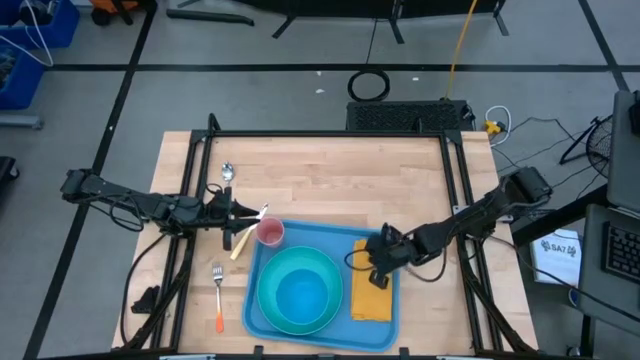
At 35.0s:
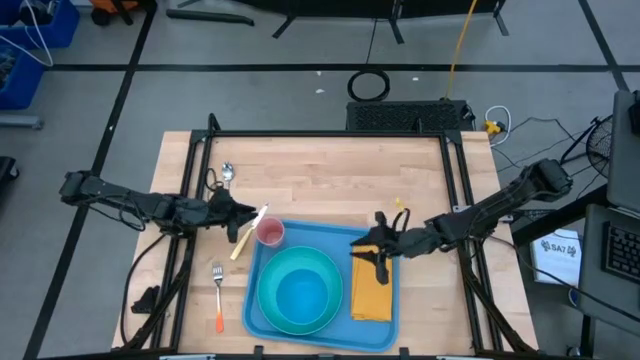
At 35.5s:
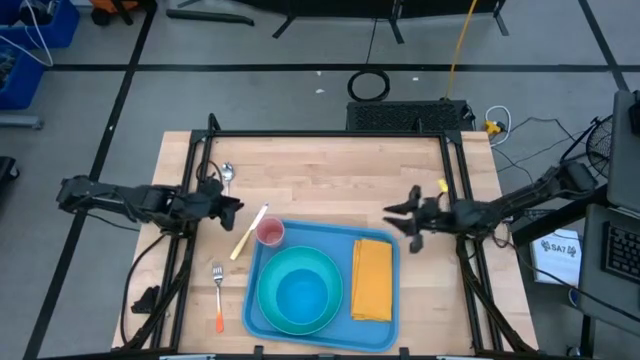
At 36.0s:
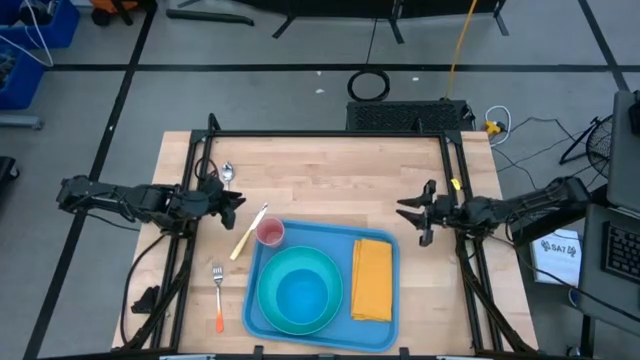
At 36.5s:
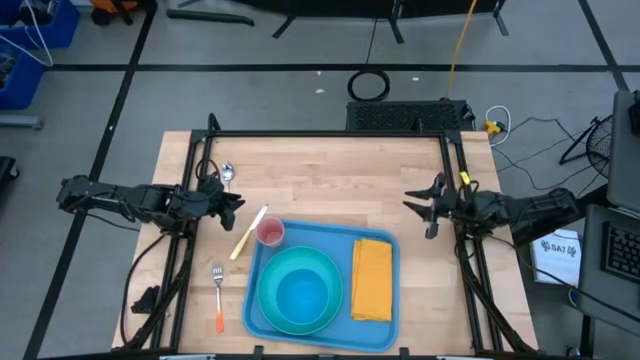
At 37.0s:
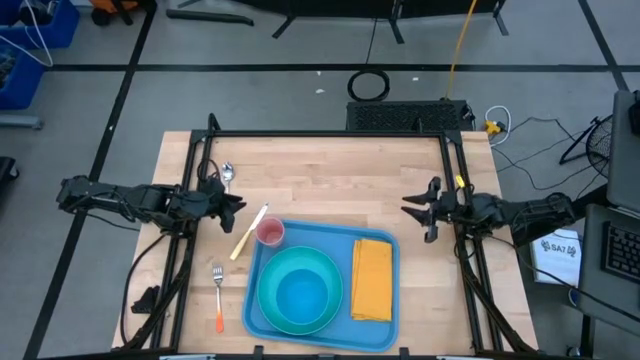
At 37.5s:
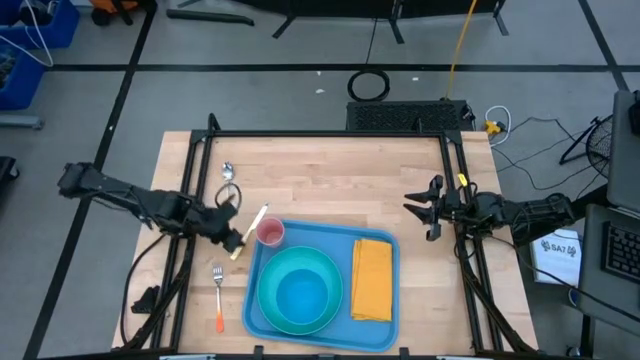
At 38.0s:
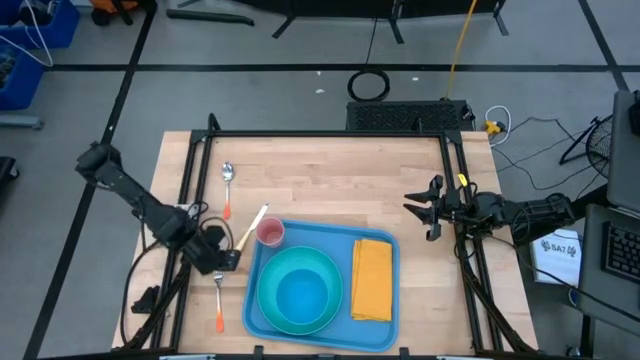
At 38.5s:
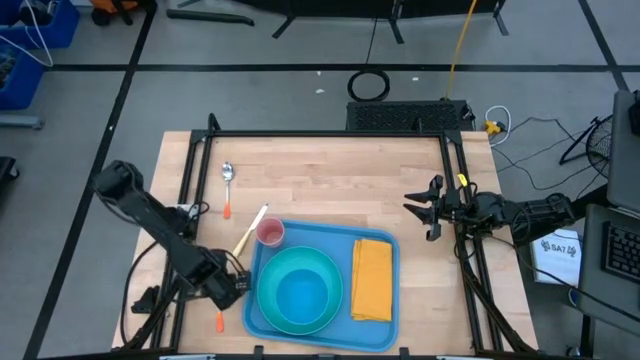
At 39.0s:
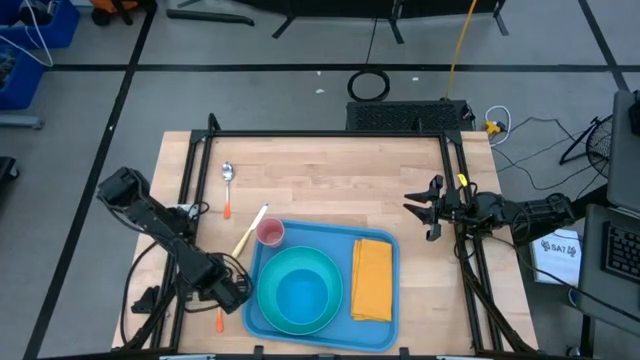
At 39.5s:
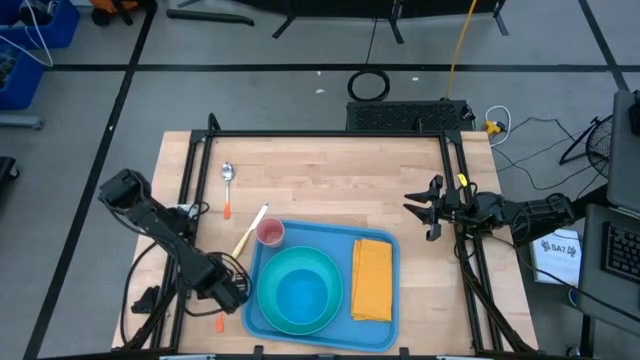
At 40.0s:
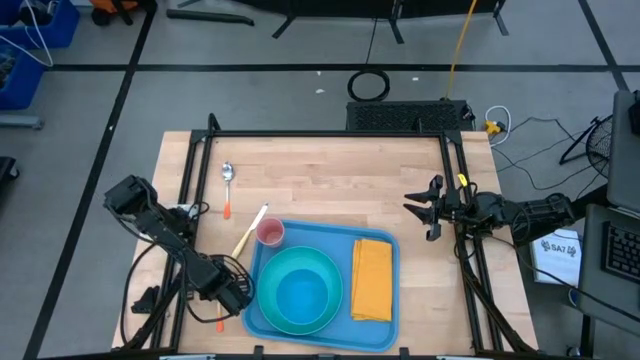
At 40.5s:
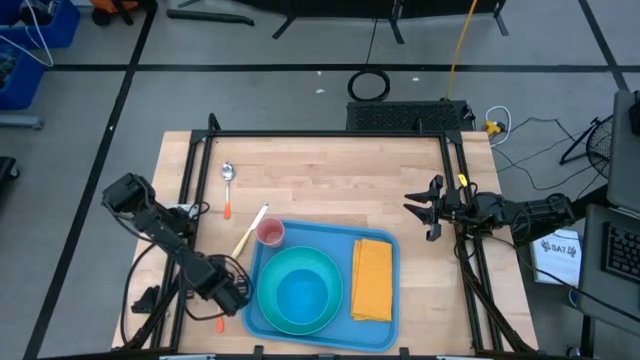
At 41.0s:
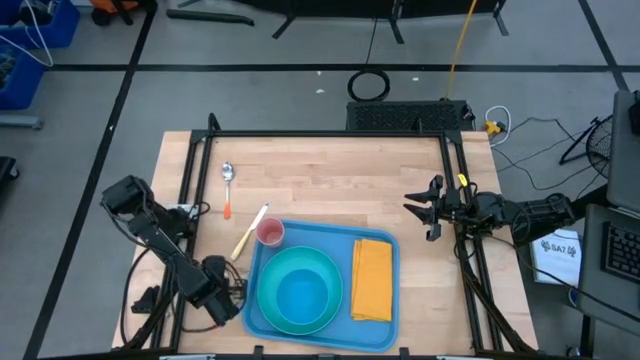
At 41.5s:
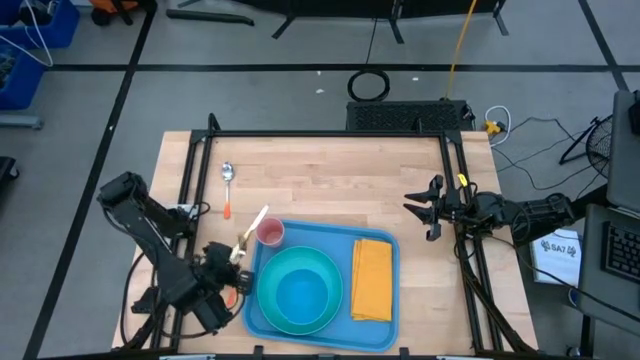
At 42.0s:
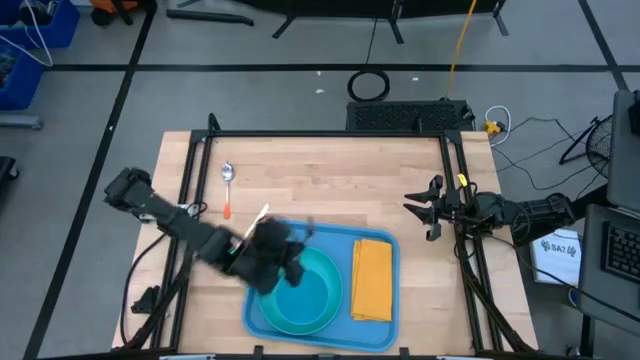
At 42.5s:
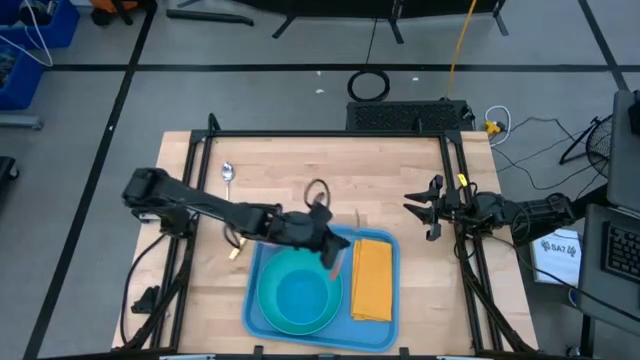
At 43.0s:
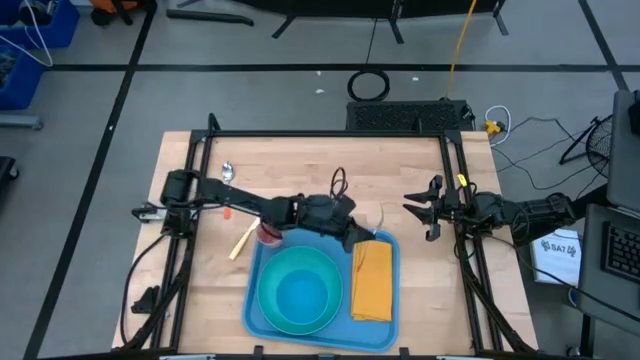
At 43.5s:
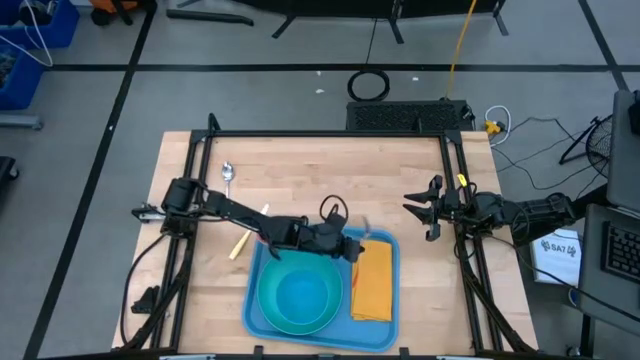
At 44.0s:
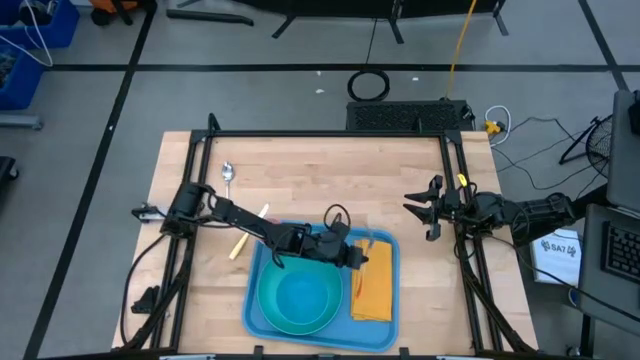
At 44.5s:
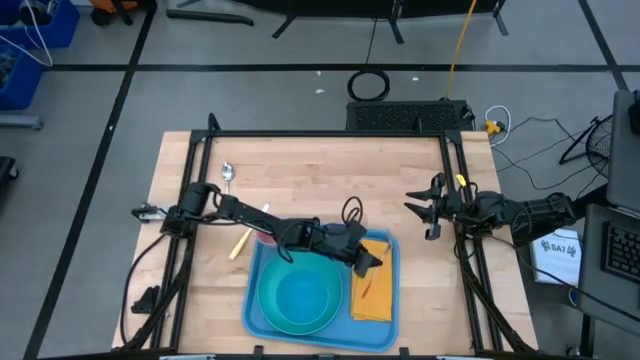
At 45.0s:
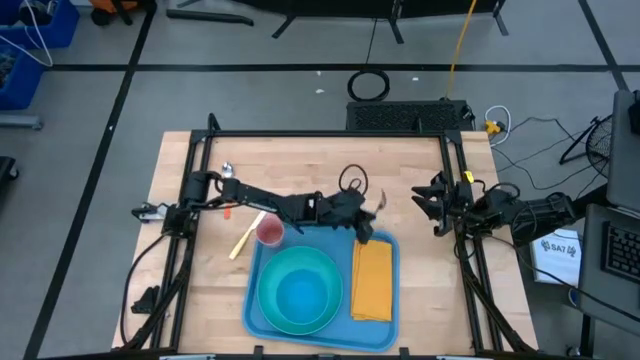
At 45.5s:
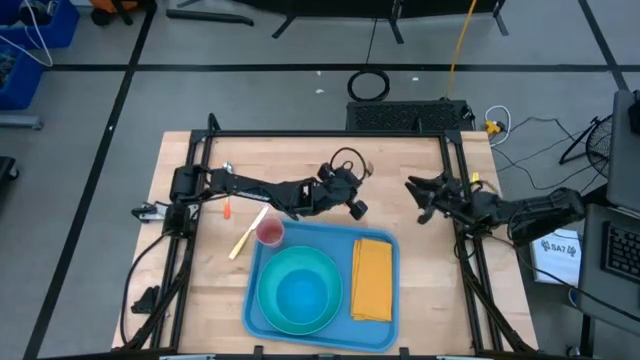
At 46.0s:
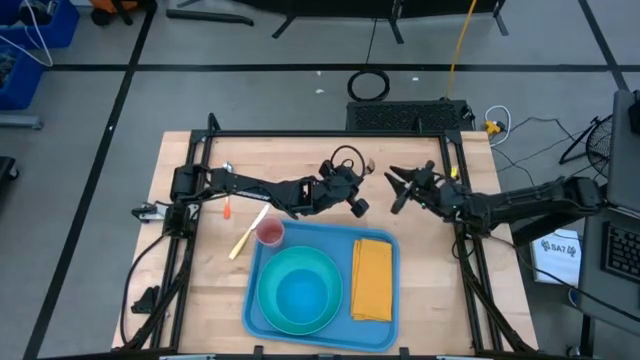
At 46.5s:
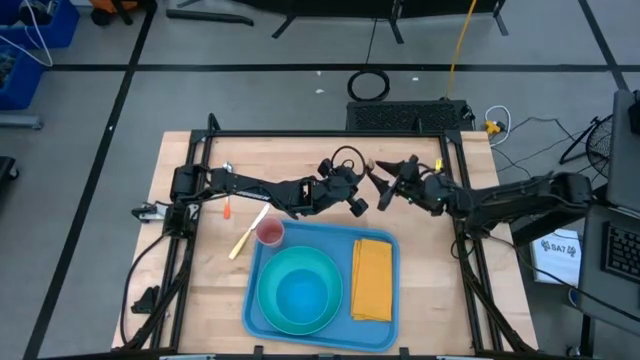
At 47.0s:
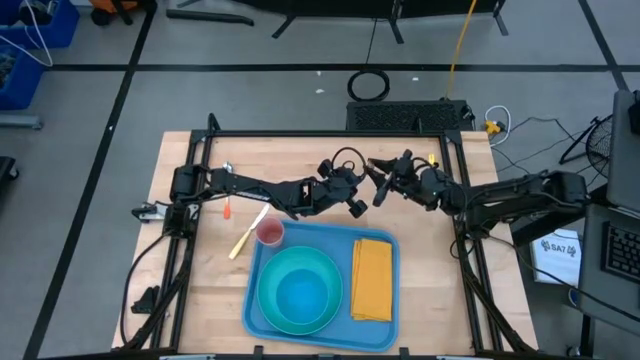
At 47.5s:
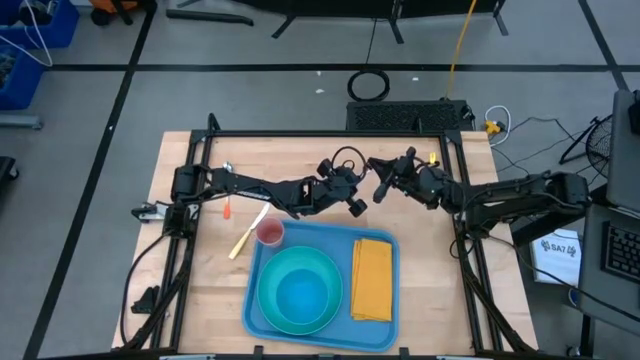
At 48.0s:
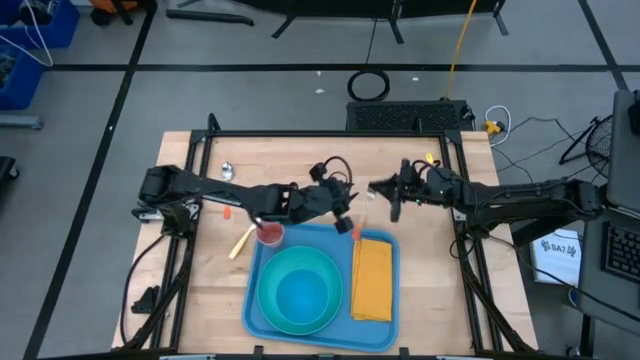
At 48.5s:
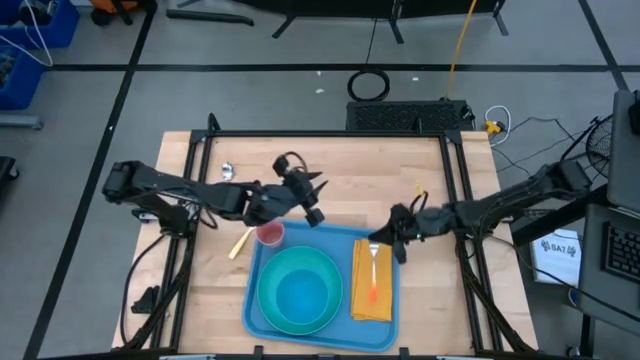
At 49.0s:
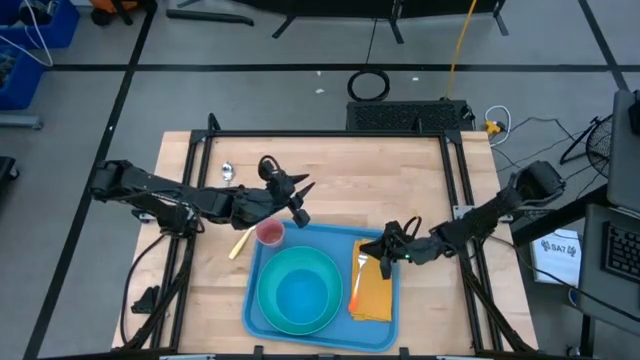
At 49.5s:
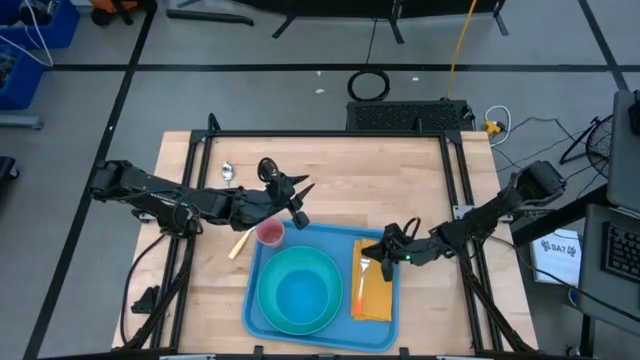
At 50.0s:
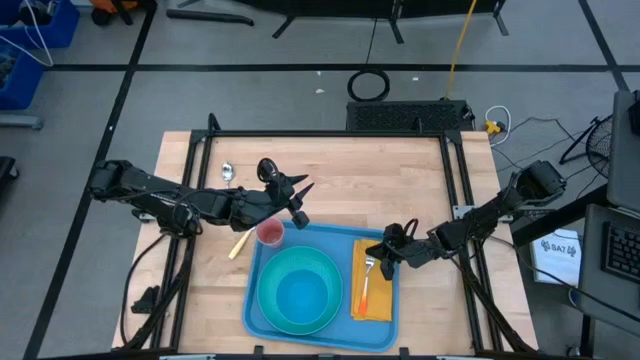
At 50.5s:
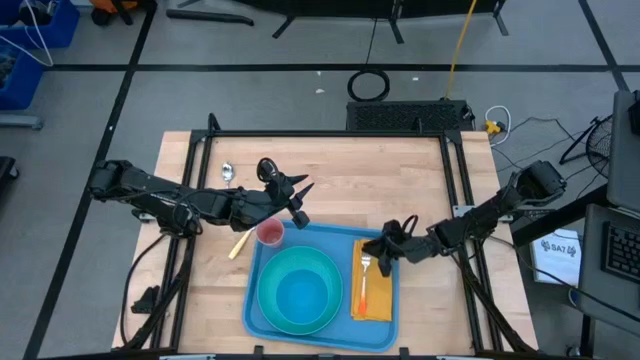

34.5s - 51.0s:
Task: Set up tray
Put the orange fork on the yellow napkin

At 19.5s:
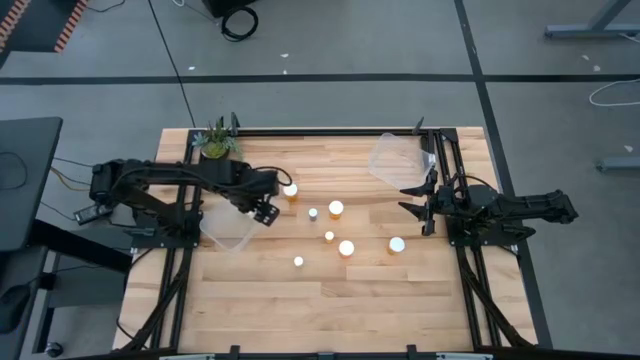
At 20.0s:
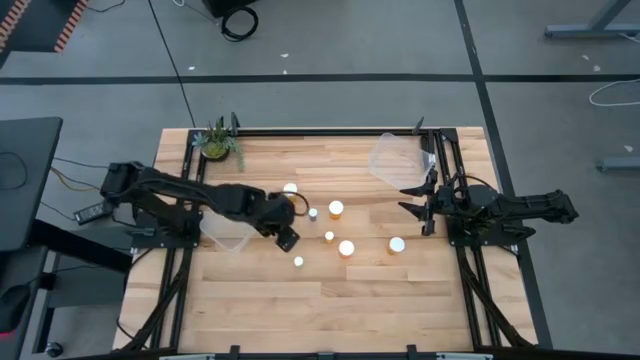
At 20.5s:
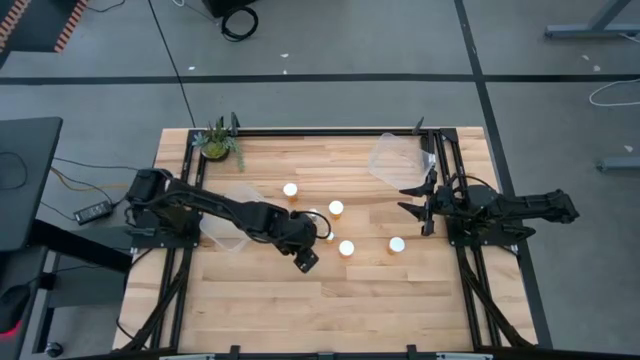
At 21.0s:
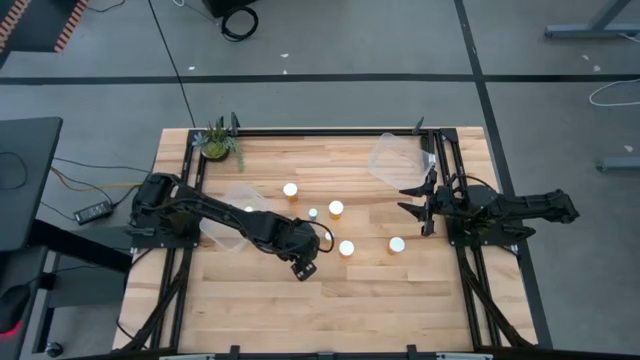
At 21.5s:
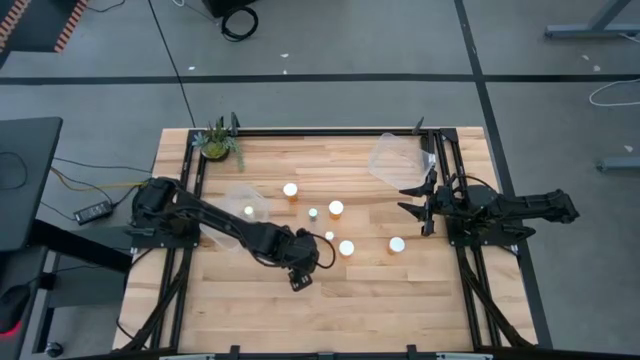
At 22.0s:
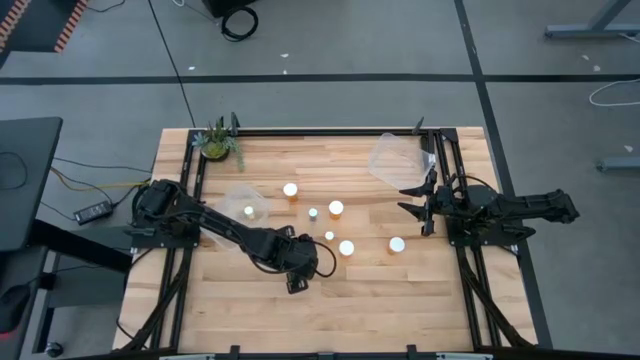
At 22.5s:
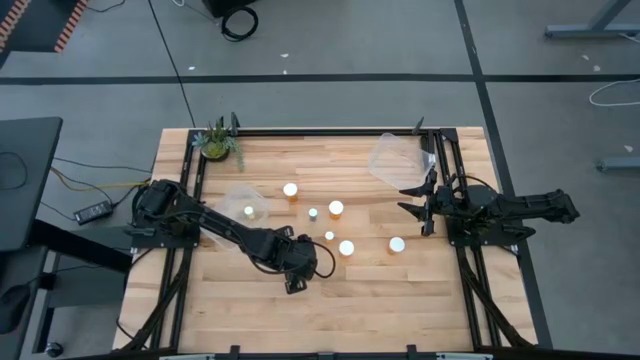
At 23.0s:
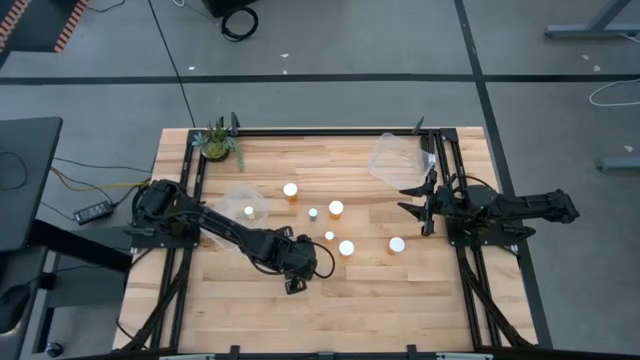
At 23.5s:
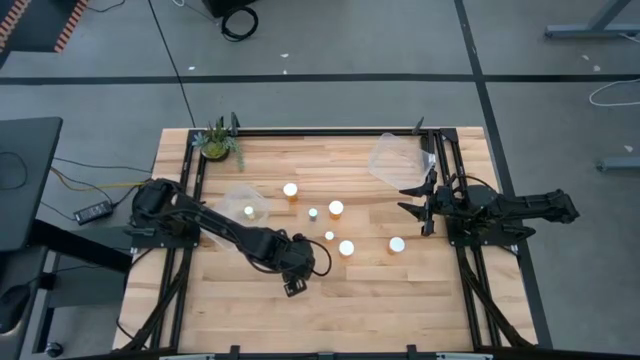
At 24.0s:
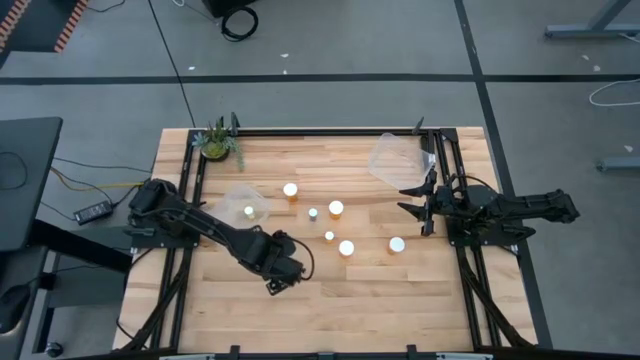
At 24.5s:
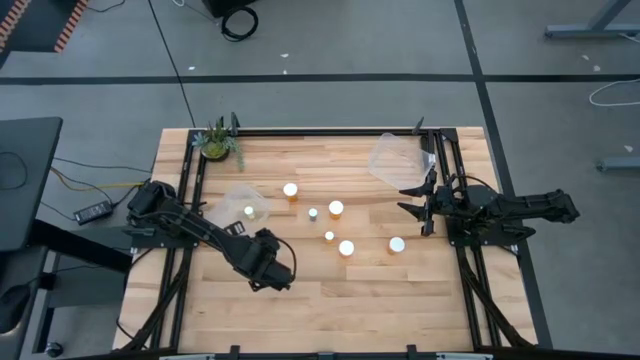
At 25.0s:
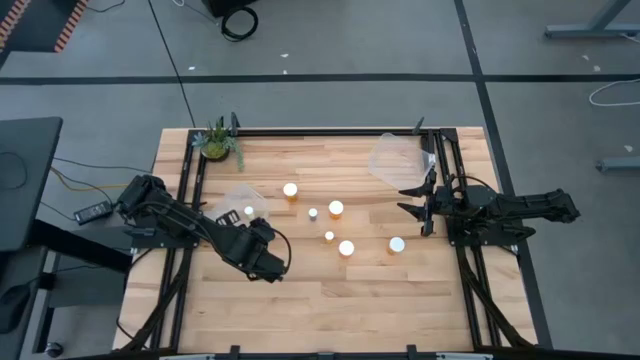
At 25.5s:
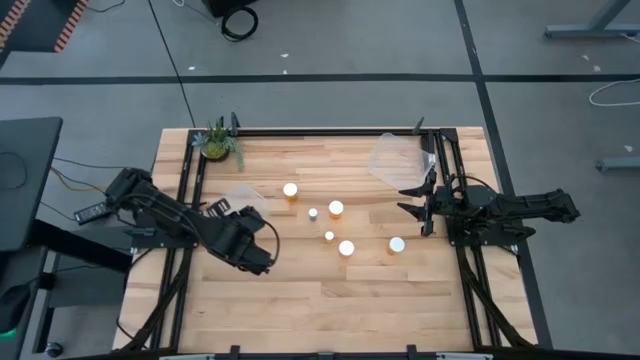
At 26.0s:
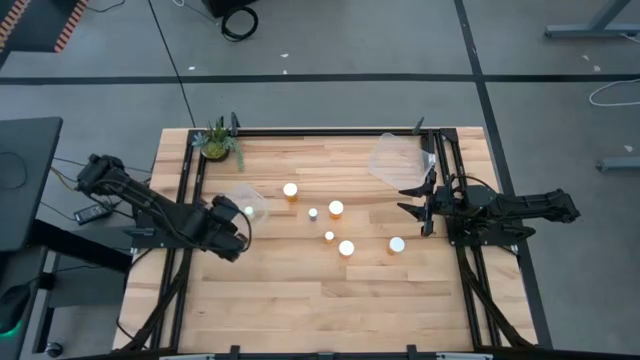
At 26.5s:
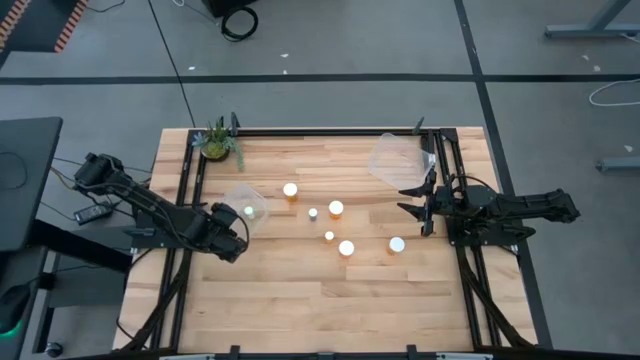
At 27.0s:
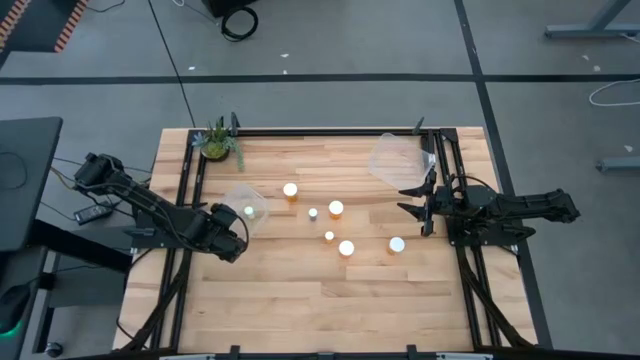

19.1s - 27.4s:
Task: Pick and place medicine bottles into bin by pill shape (circle, oval)
Put the yellow pill bottle into the left transparent bin
